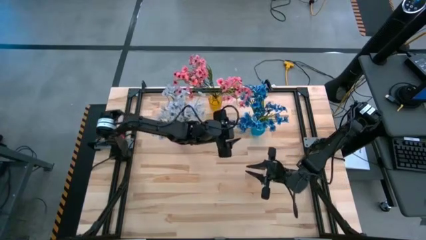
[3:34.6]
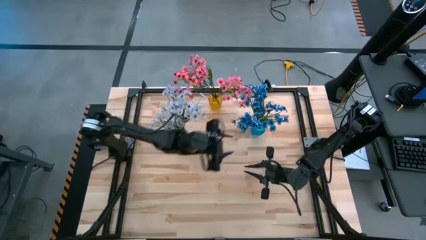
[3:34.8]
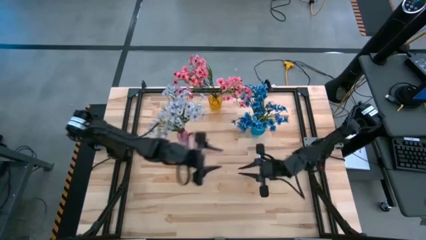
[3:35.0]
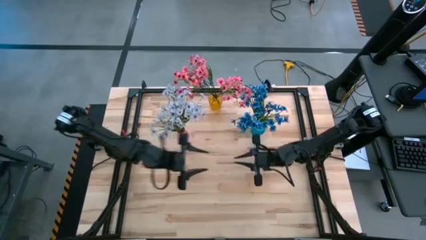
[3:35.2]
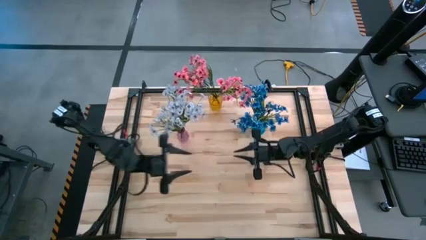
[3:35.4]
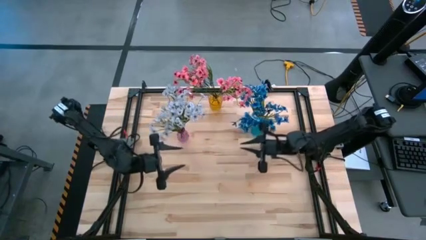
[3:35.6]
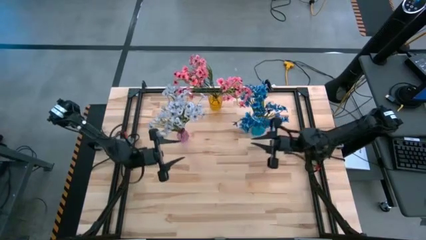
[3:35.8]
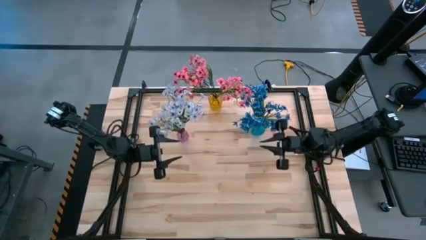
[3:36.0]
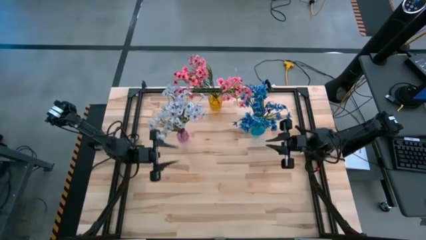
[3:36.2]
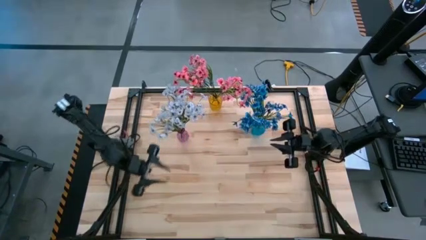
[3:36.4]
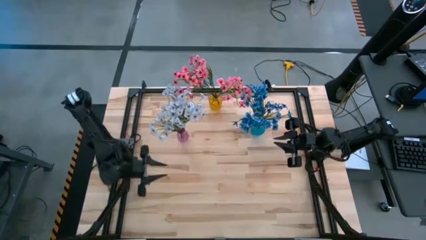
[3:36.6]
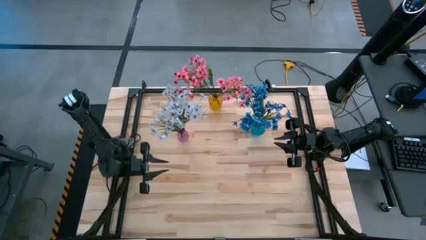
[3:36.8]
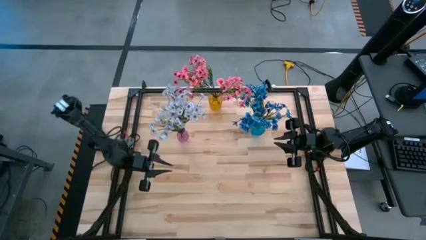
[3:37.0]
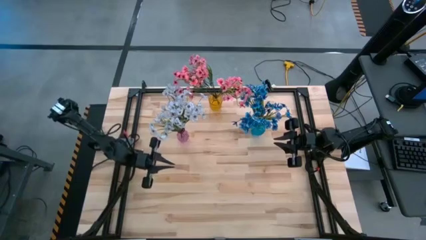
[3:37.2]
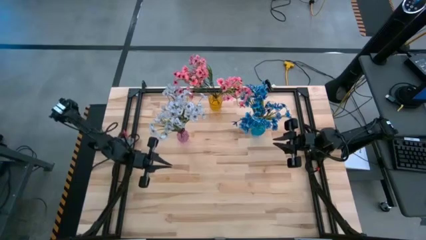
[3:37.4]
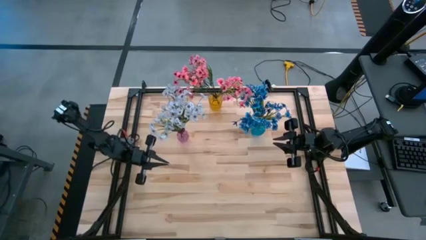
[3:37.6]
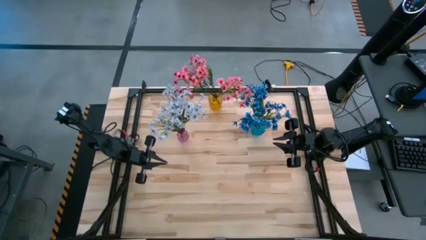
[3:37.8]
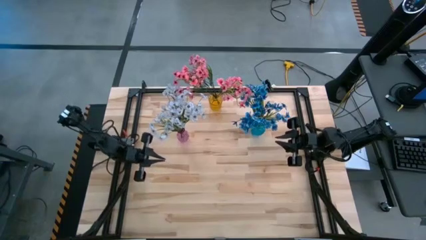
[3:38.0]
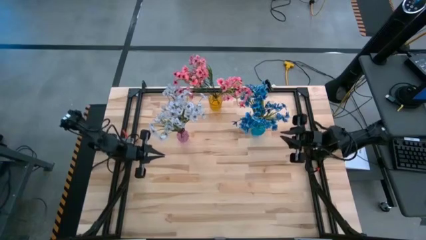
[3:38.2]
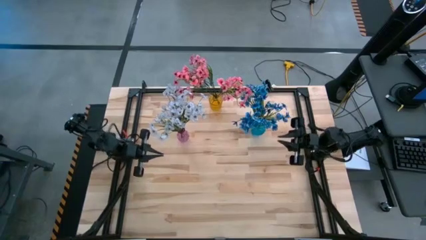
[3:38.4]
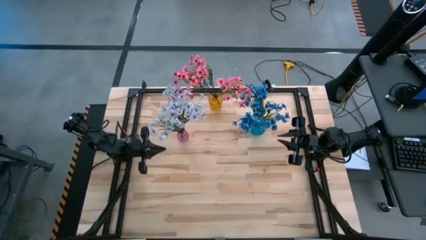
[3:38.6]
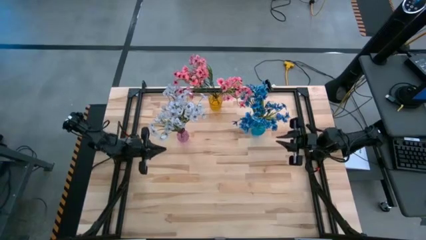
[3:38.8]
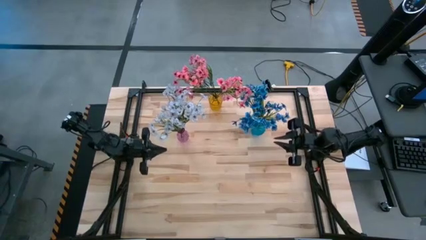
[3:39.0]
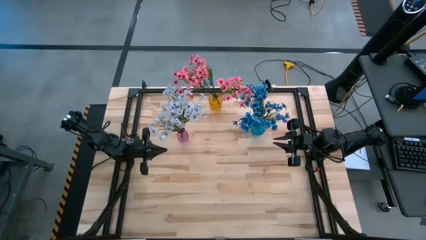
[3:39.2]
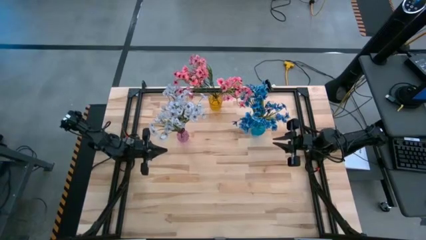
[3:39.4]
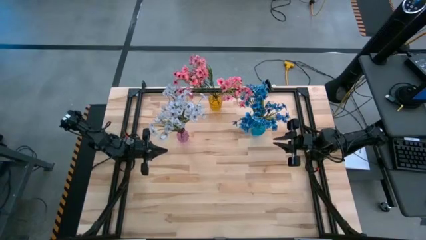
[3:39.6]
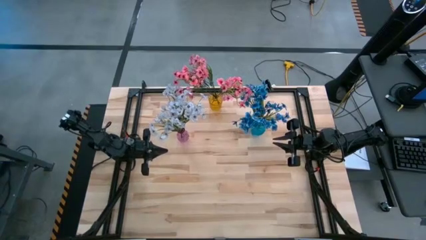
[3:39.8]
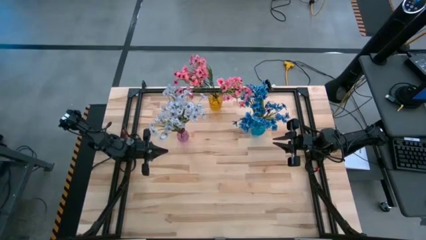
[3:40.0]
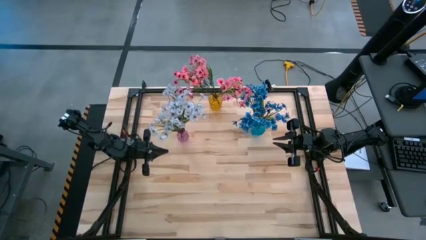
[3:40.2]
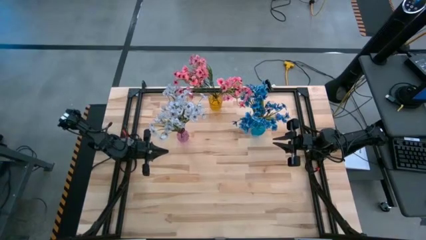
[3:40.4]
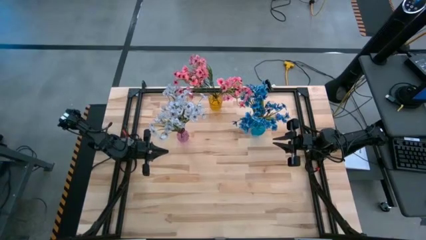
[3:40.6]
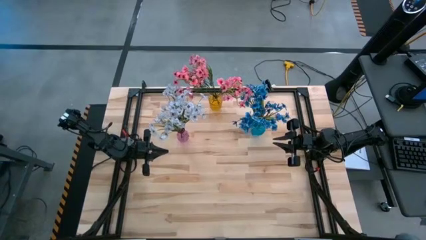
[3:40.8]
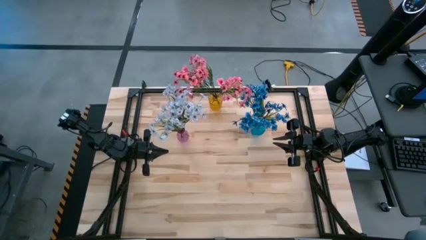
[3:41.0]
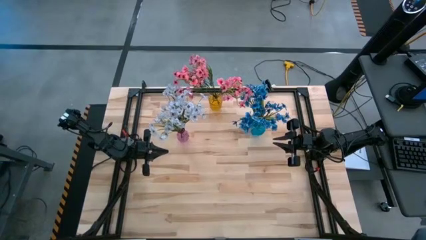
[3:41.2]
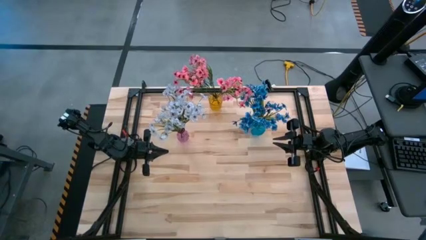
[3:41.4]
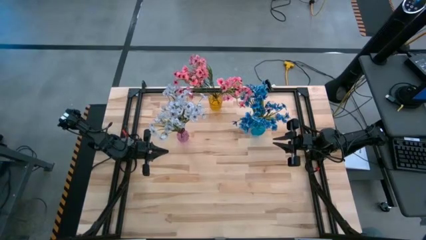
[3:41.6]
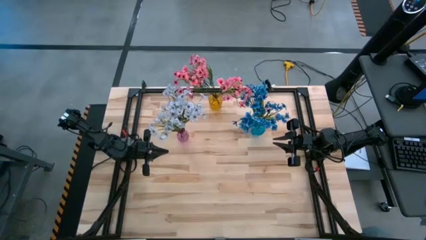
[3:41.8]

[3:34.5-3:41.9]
Task: Sort flowers into vase by color
Return to Home Position

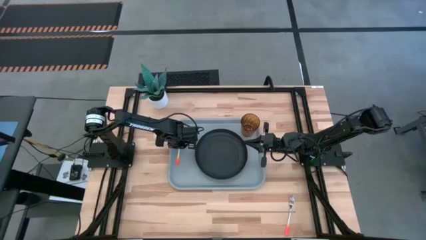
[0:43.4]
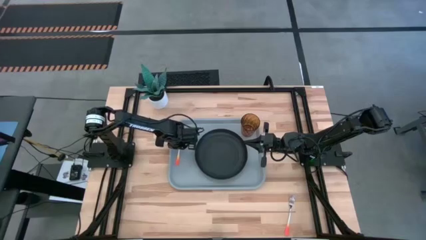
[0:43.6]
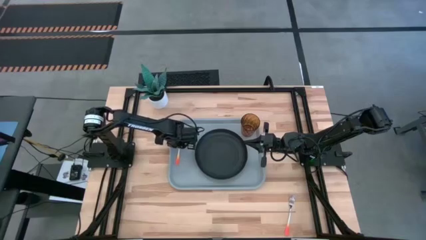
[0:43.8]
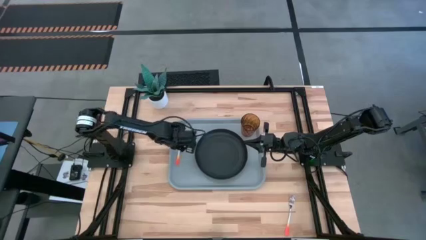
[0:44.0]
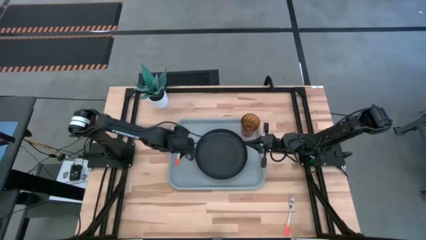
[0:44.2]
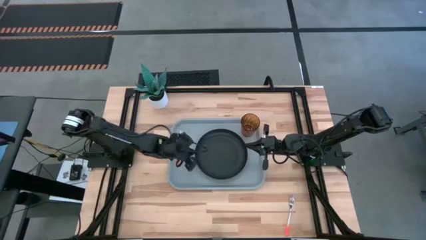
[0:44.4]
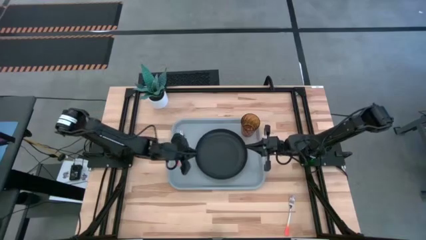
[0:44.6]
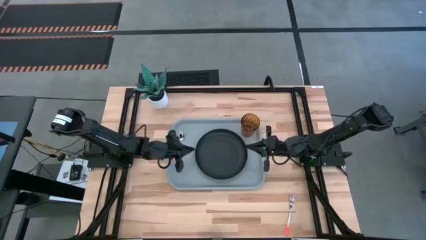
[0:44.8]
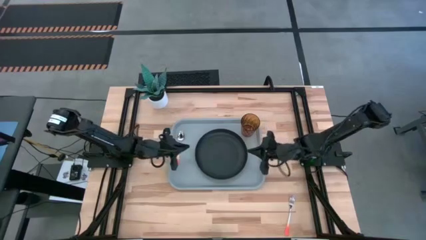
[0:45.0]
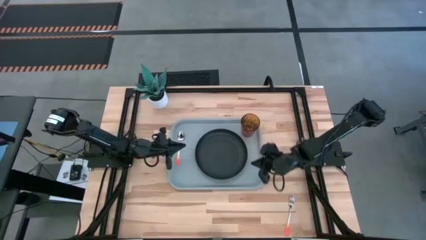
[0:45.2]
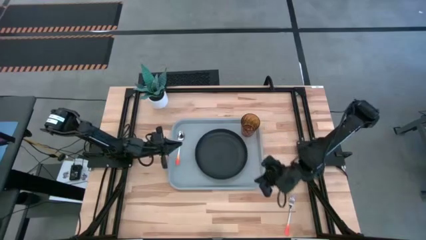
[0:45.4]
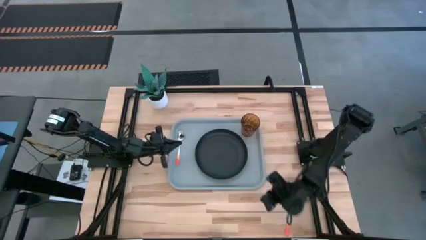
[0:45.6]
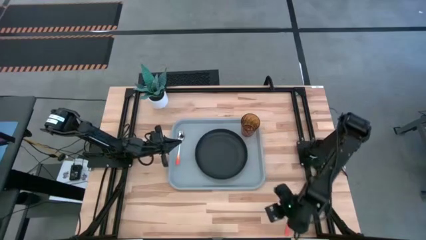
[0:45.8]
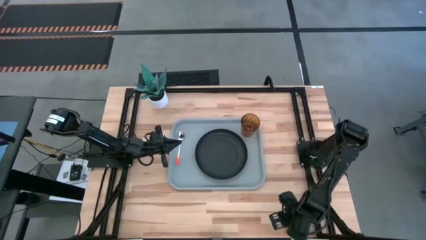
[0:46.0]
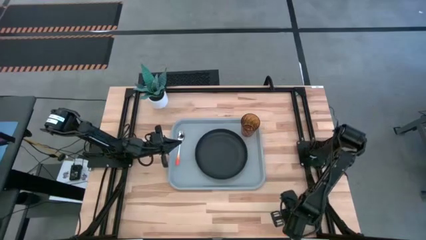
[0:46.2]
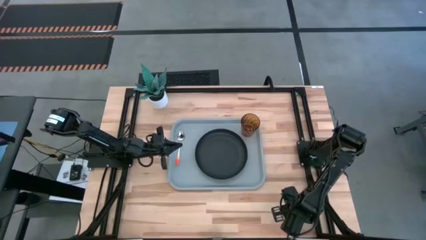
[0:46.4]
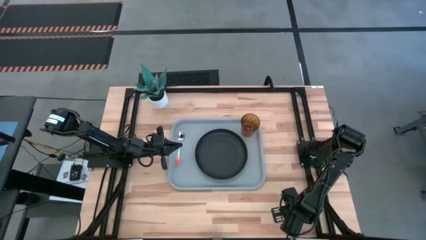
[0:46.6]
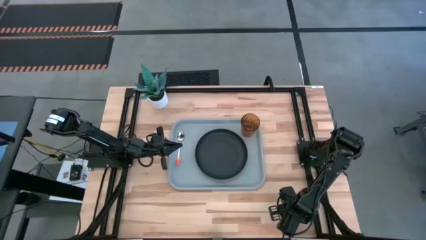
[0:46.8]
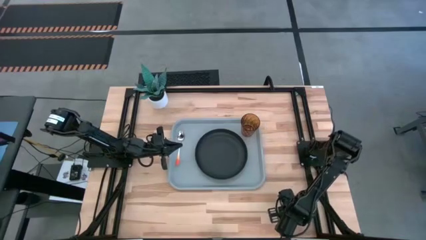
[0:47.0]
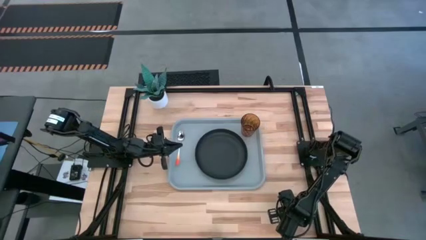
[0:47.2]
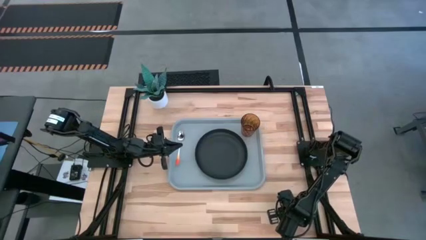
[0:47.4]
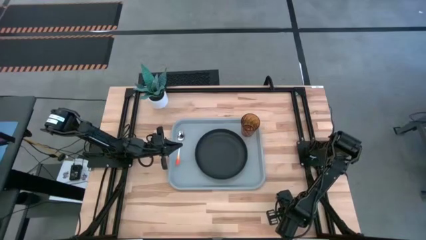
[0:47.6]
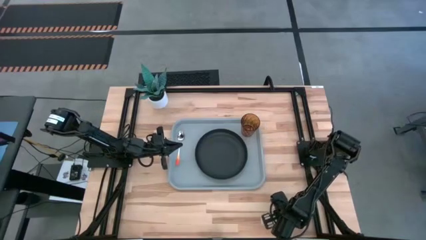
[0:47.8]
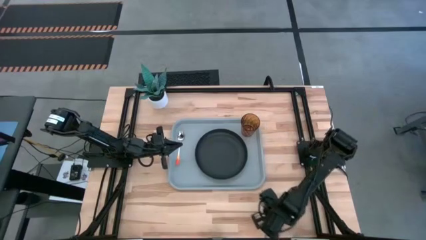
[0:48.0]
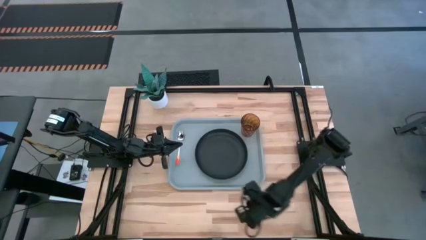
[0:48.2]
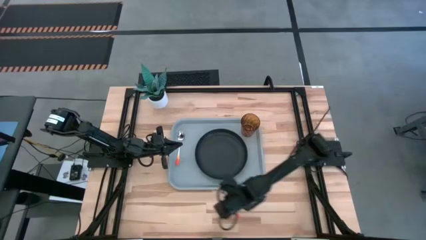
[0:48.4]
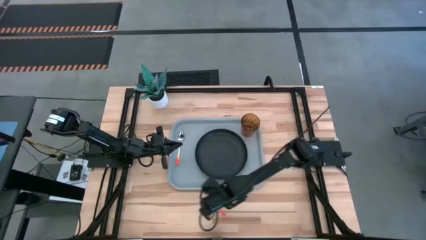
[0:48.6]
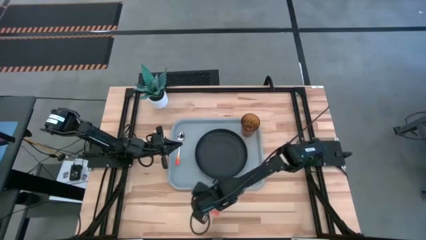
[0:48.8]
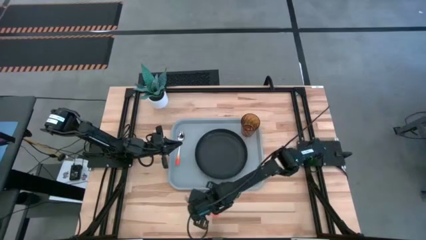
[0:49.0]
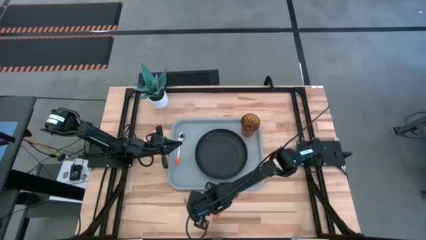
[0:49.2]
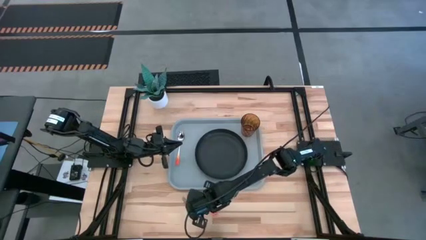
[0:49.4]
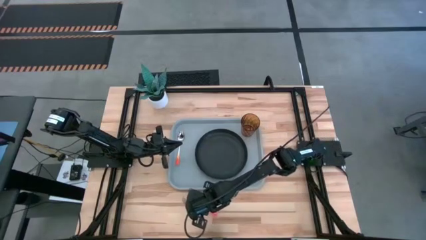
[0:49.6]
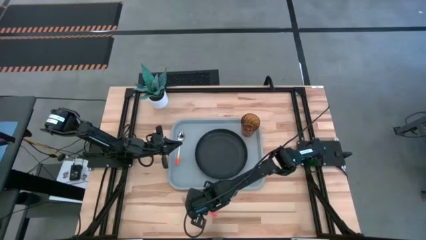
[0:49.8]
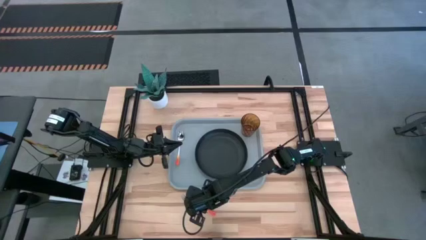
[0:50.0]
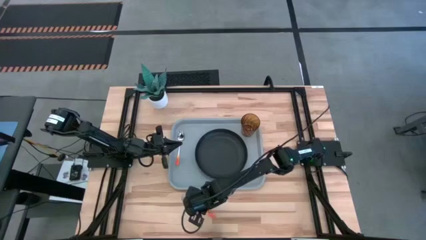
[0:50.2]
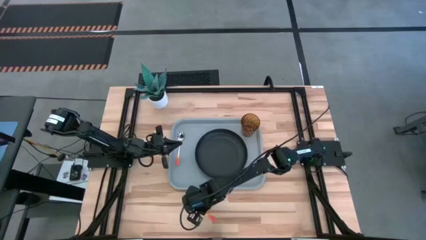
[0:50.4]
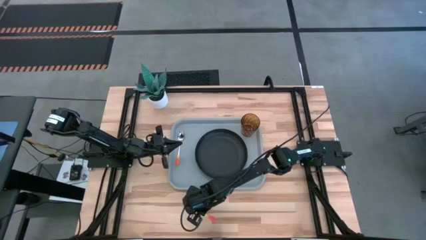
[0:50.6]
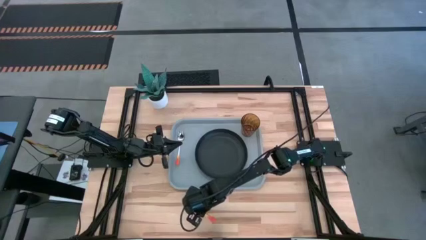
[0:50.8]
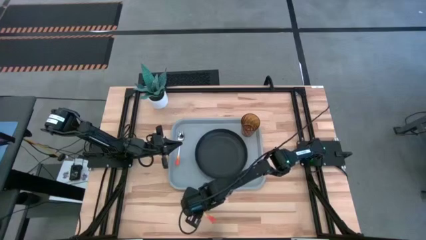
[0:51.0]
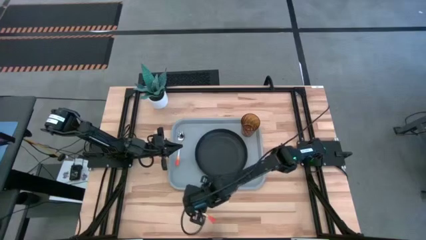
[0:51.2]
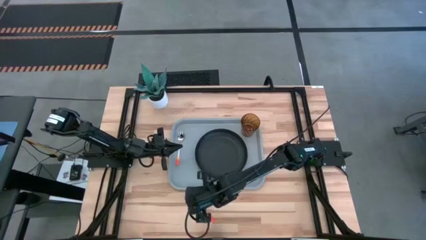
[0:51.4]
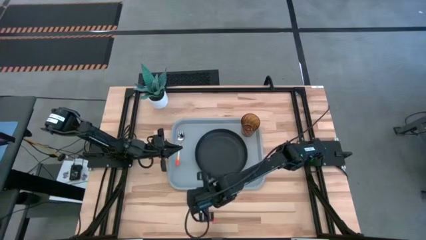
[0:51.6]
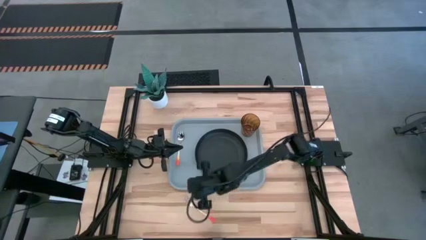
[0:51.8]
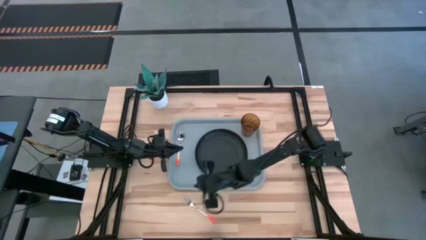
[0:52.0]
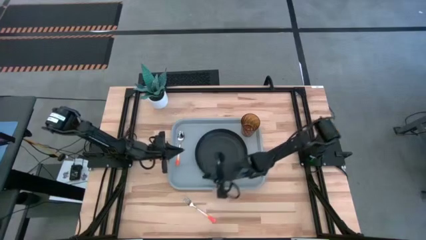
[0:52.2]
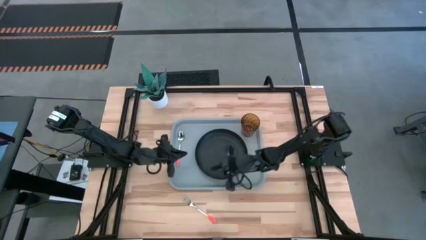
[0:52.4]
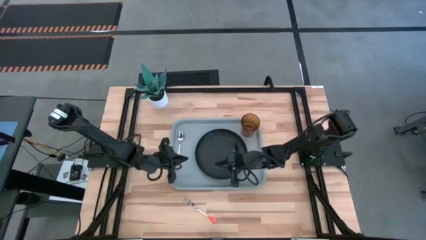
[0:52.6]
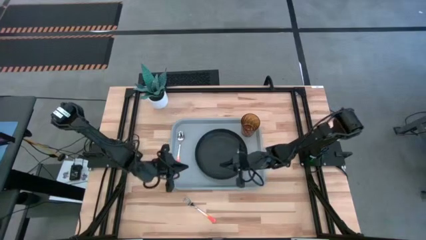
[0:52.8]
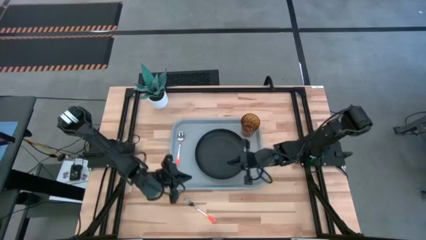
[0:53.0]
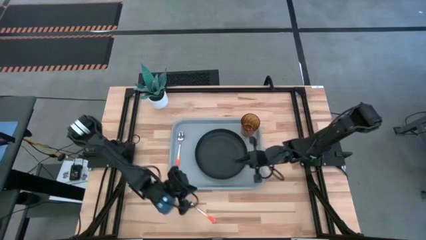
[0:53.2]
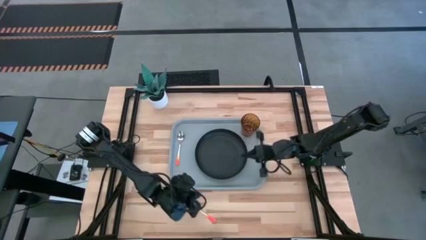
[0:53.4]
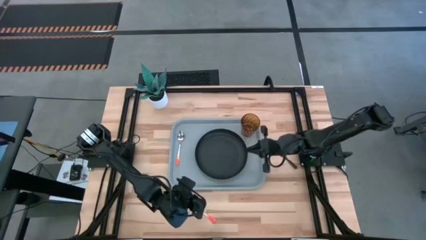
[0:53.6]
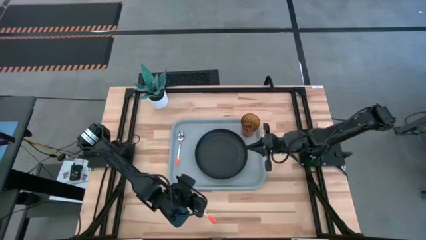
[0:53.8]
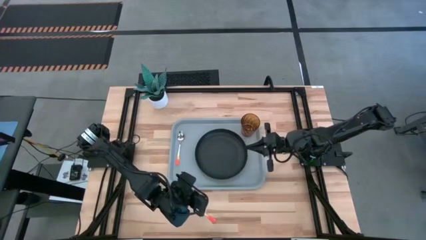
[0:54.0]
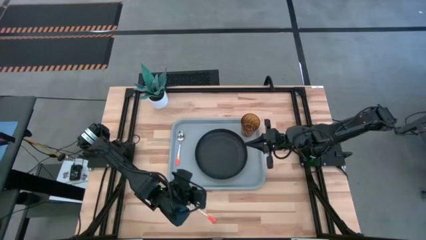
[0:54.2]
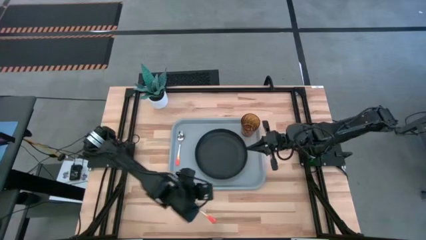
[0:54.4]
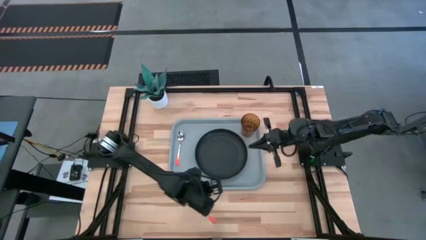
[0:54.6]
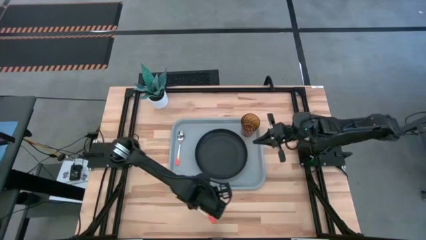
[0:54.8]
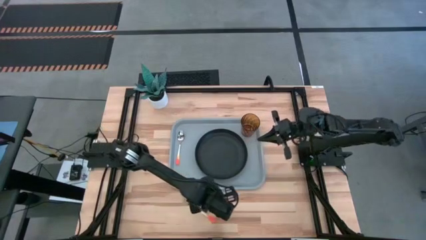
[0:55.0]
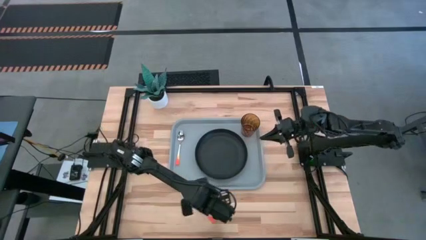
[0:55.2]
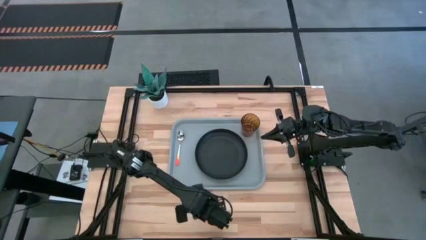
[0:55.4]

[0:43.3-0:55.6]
Task: Pick and place plate/cup/fork/spoon on tray
Put the orange fork on the gray tray to the right of the orange spoon
